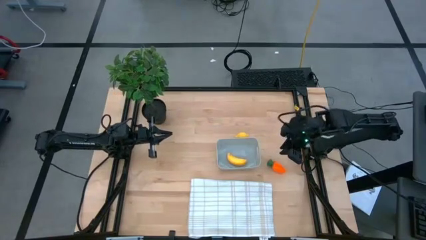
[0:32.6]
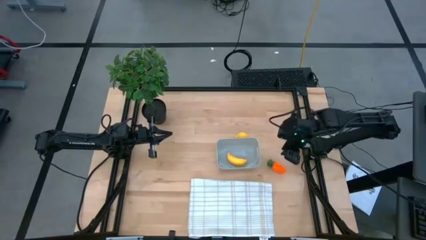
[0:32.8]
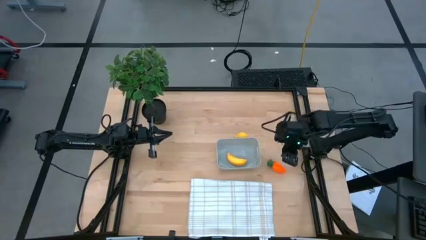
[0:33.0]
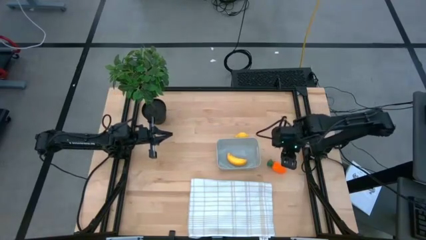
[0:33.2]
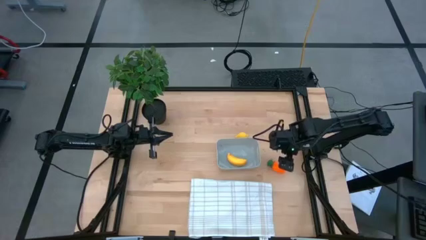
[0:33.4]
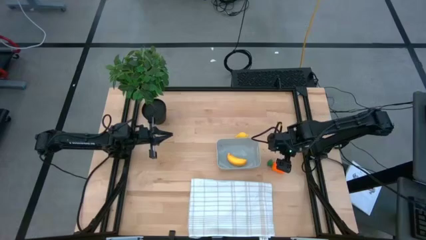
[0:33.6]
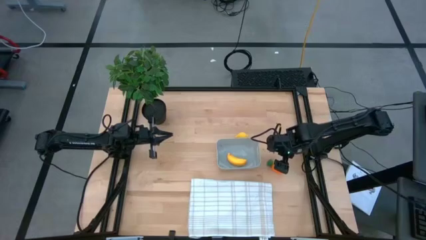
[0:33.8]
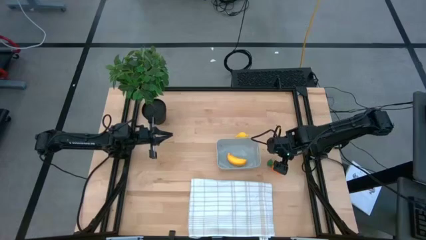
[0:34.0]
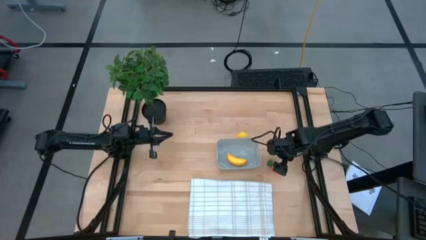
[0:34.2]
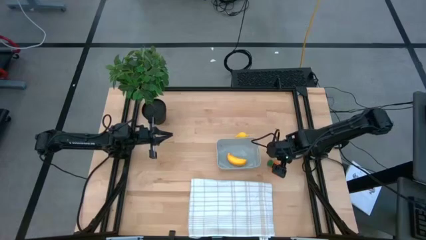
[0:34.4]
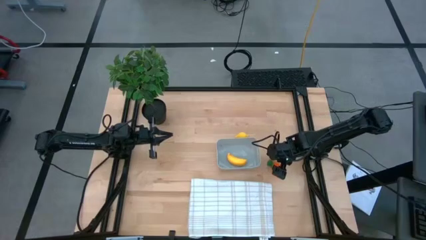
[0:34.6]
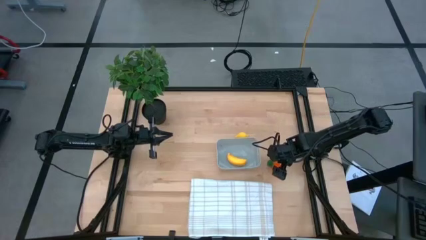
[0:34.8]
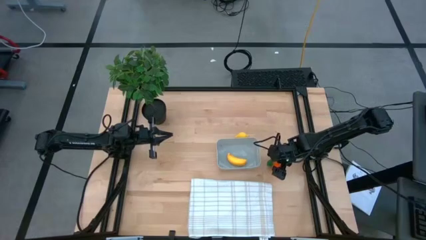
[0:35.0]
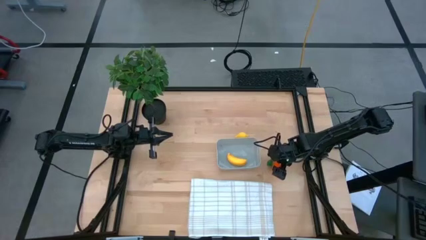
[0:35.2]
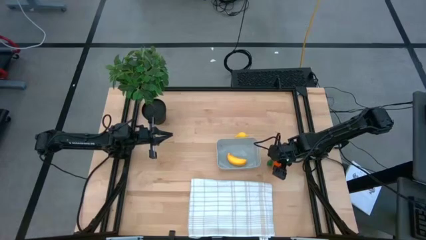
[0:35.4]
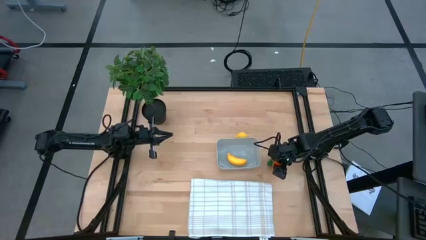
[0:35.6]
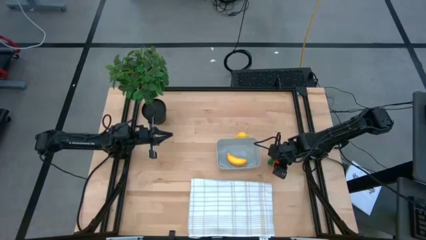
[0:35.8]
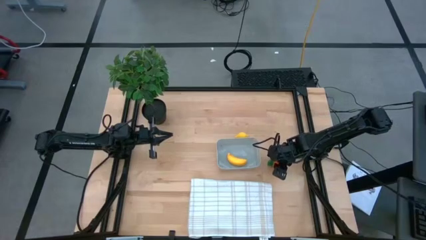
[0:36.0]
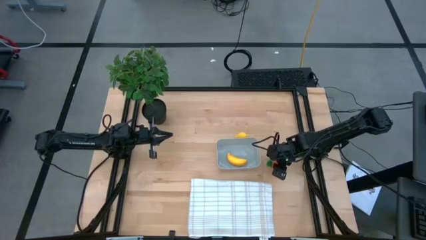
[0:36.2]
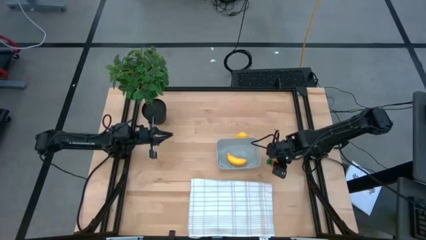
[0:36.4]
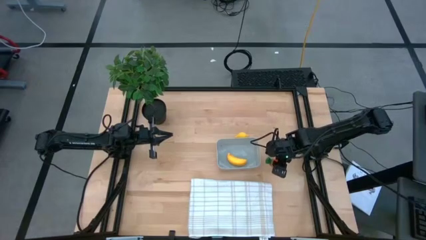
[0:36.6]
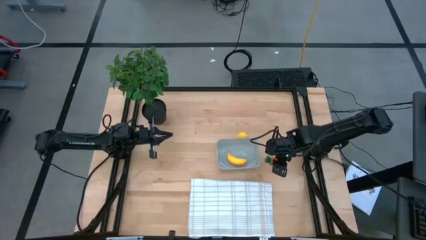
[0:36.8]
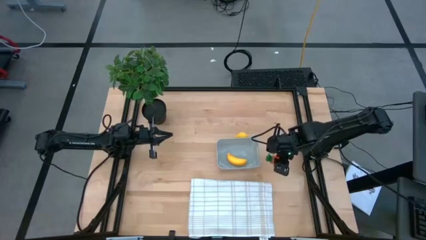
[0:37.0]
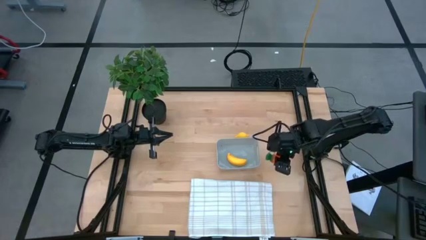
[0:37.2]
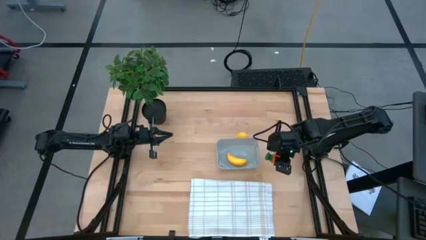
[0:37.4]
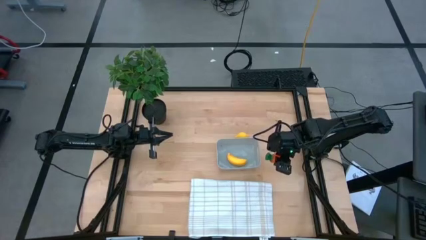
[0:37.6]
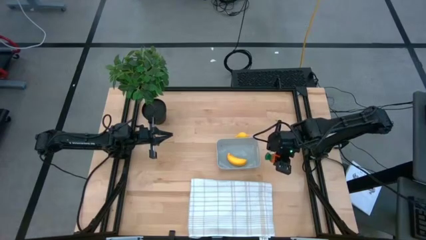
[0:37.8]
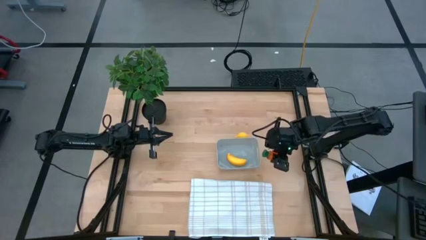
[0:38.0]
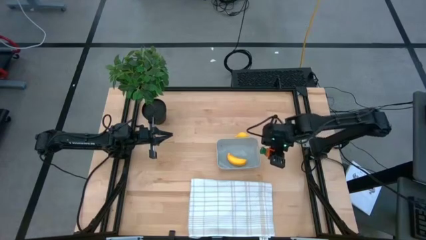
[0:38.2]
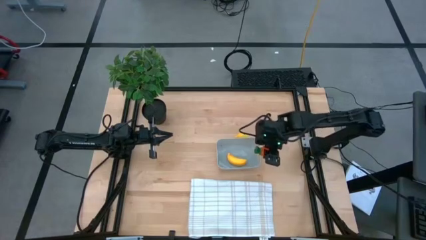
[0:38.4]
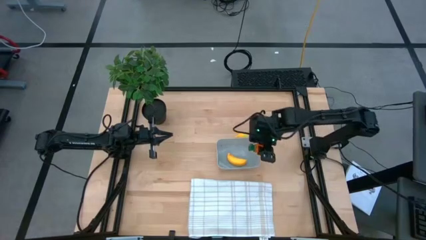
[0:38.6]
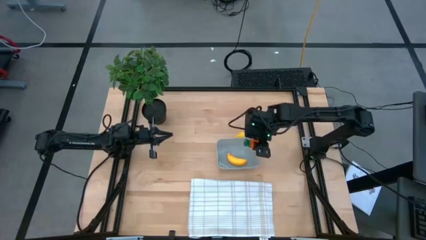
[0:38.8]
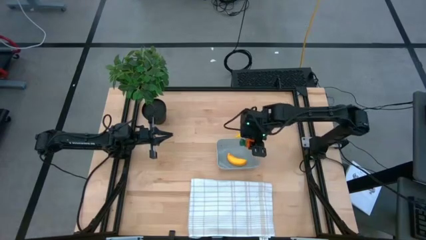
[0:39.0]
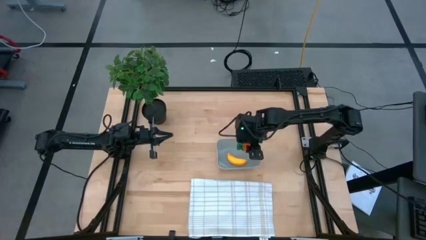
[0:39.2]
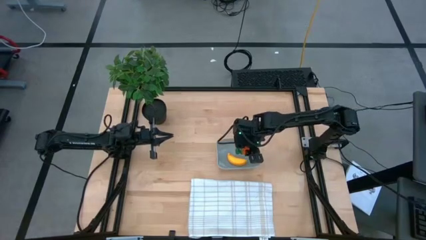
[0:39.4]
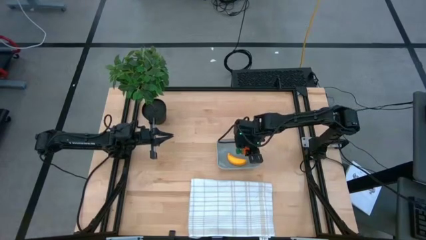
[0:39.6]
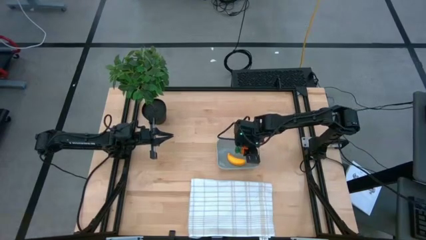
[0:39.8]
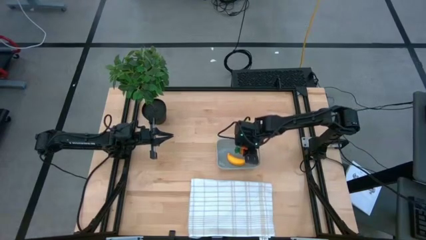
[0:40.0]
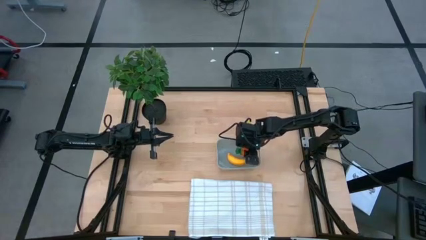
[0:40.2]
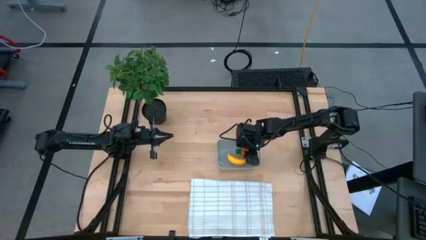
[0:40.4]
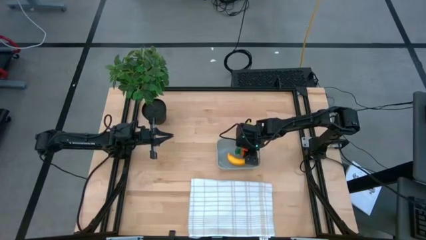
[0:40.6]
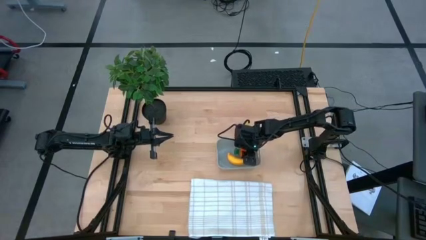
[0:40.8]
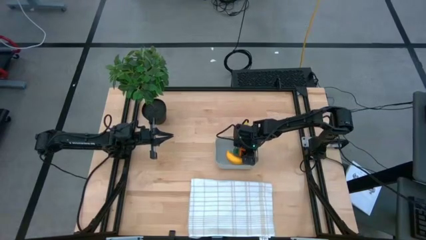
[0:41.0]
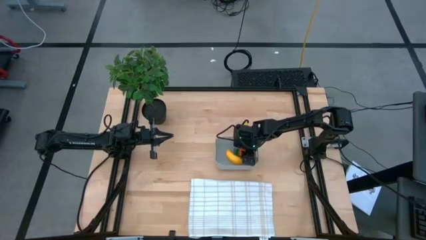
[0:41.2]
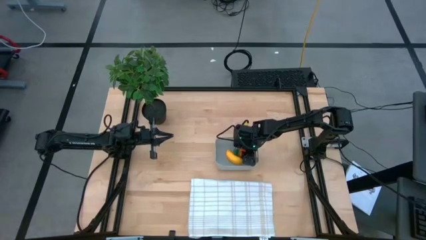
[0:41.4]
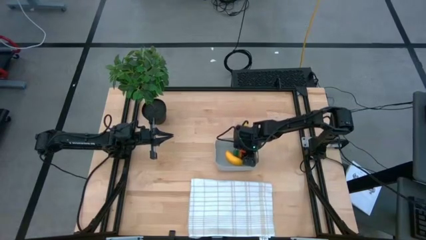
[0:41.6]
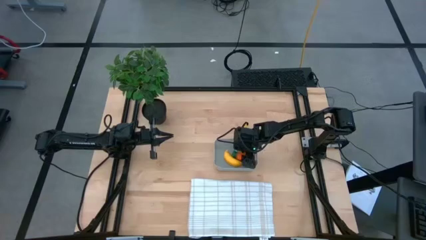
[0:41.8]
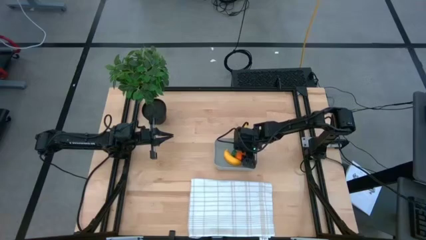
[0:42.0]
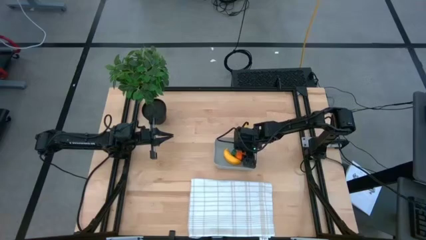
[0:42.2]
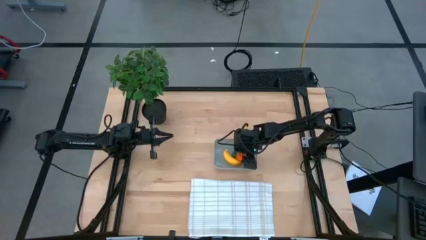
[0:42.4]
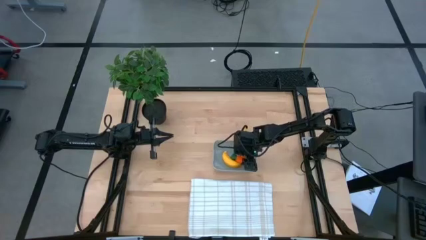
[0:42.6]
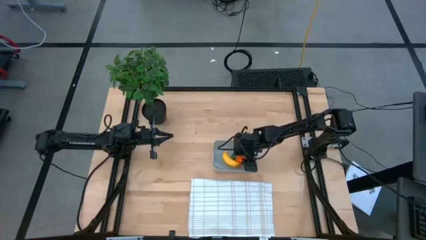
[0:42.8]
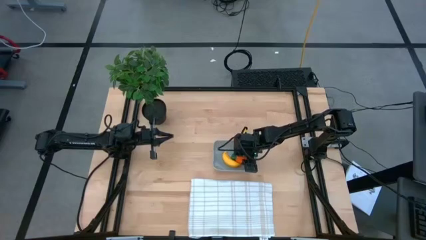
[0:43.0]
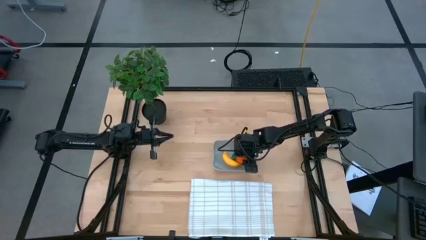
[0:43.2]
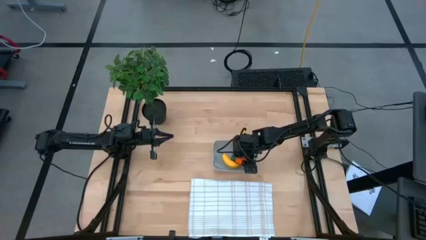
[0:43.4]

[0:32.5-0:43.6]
Task: Pick and placing Produce into tupperware
Put the orange carrot into the gray bin

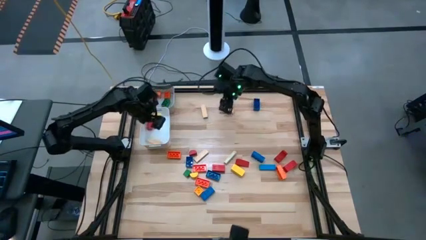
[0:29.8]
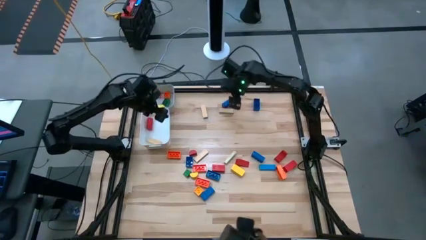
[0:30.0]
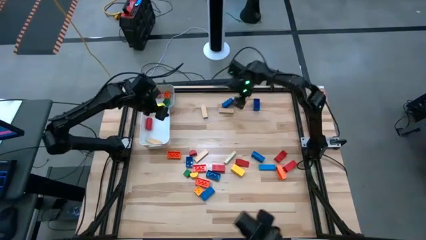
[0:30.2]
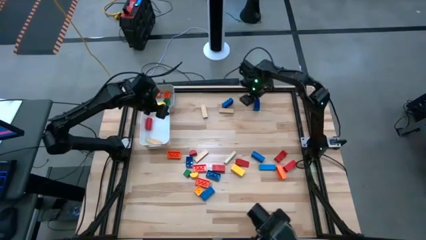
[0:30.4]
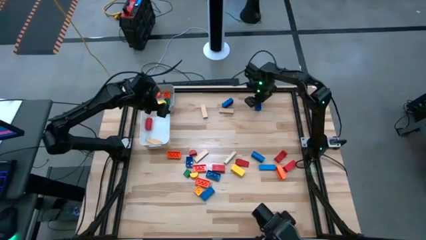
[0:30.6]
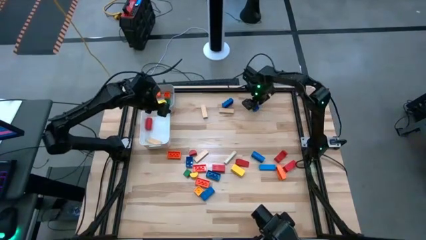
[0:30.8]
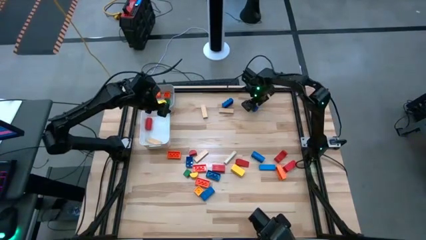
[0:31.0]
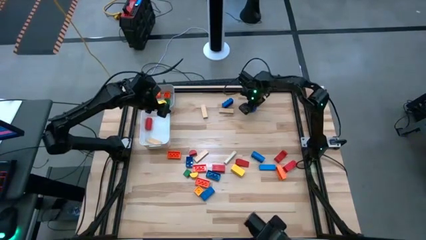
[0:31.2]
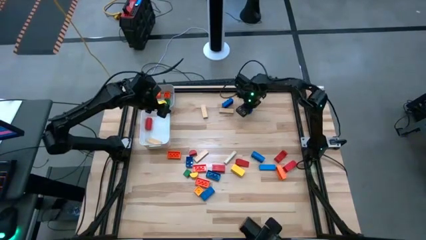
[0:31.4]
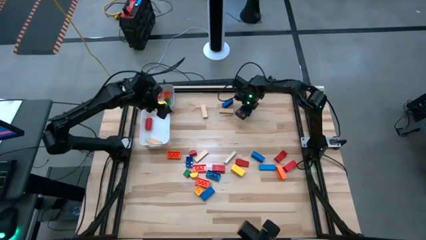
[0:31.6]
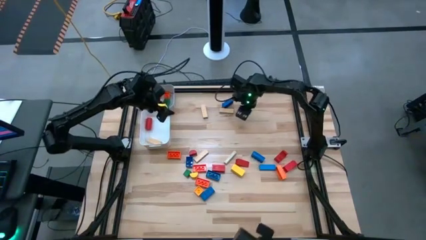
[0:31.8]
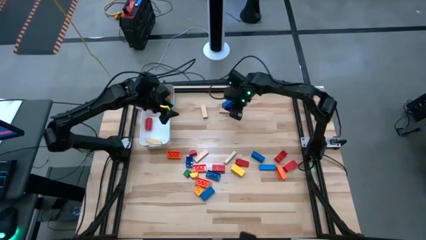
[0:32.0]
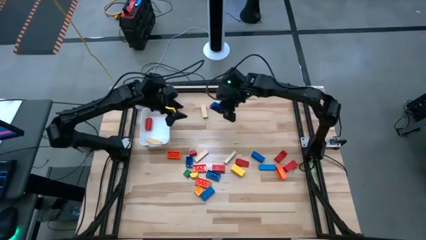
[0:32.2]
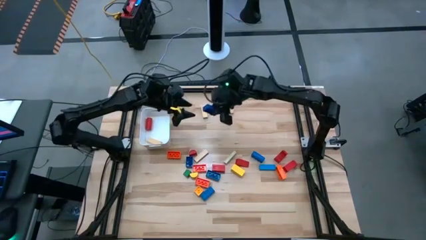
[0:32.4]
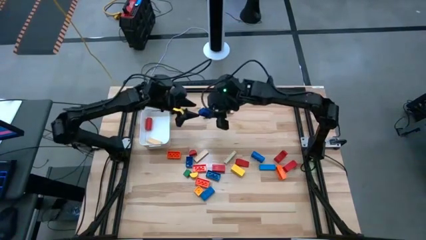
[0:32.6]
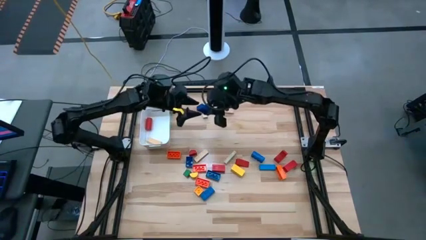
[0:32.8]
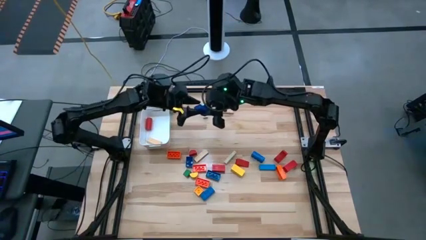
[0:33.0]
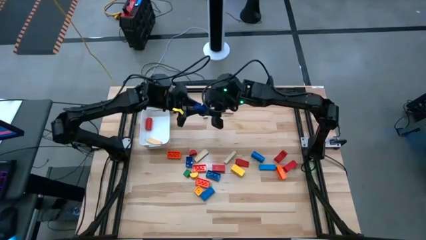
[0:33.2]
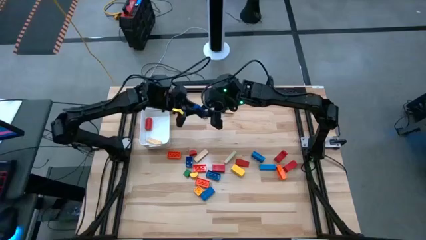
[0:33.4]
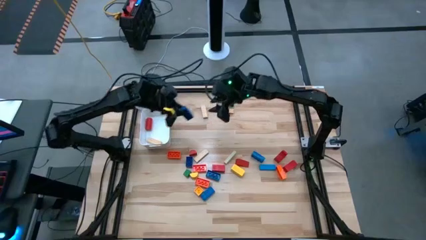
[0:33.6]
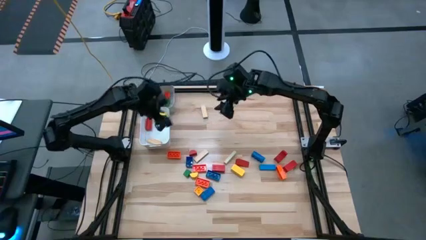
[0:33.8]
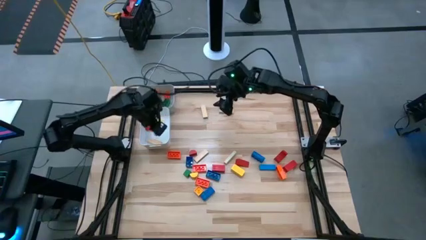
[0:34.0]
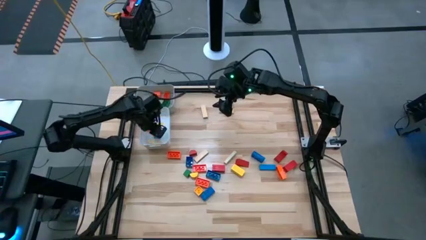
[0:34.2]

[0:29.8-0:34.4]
Task: Sort blocks by size
Put the large blue game piece into the white bin
